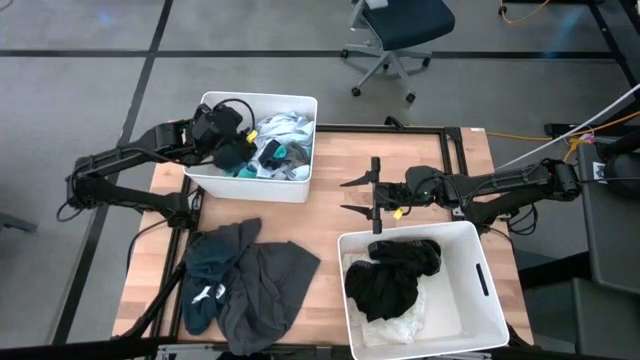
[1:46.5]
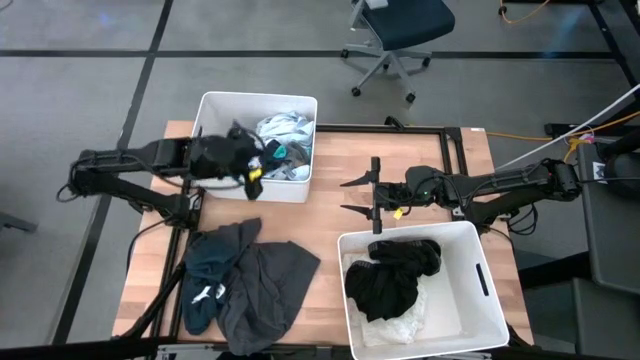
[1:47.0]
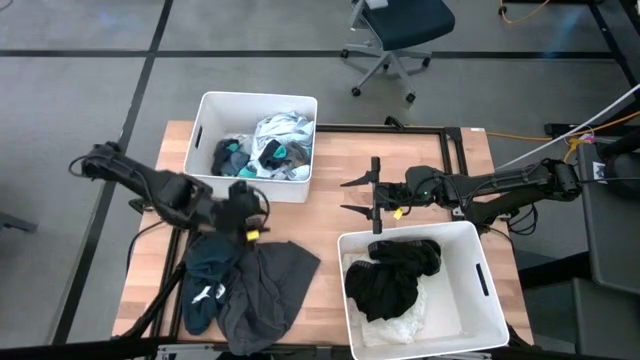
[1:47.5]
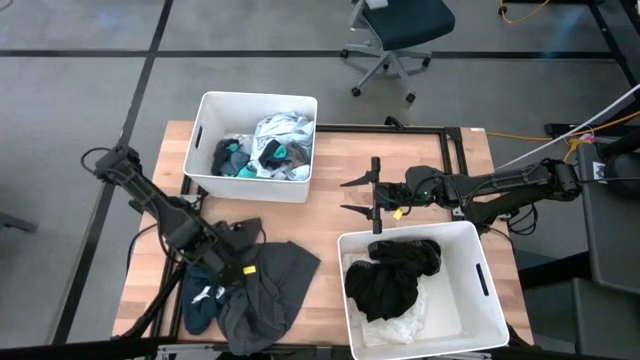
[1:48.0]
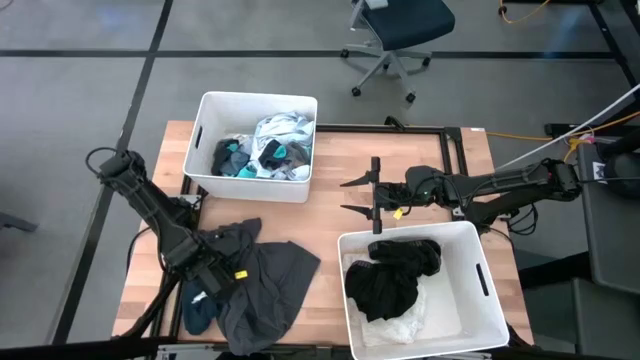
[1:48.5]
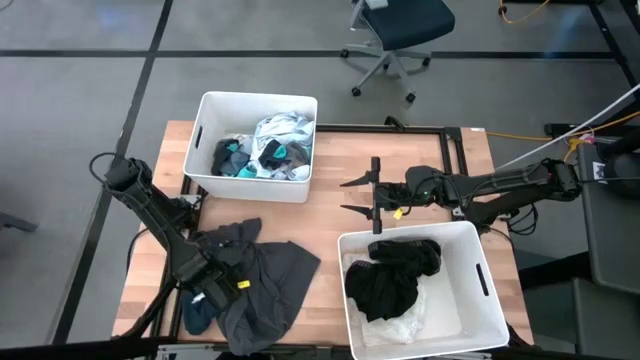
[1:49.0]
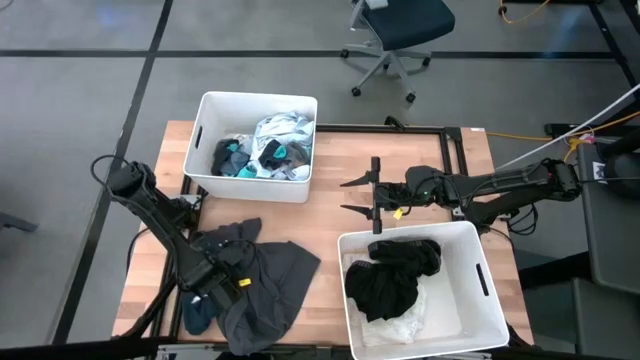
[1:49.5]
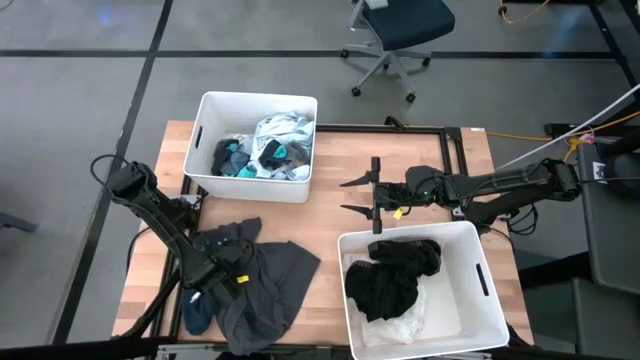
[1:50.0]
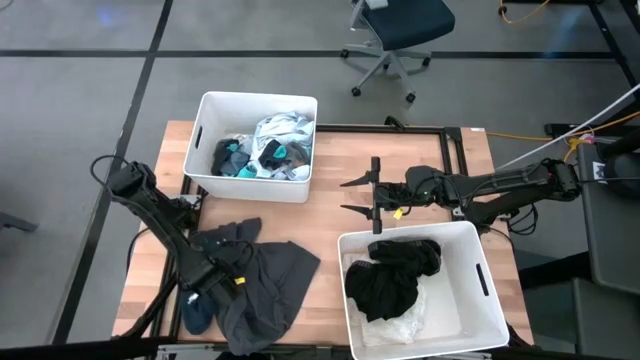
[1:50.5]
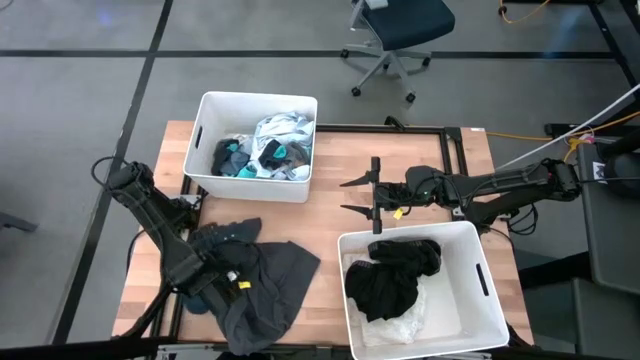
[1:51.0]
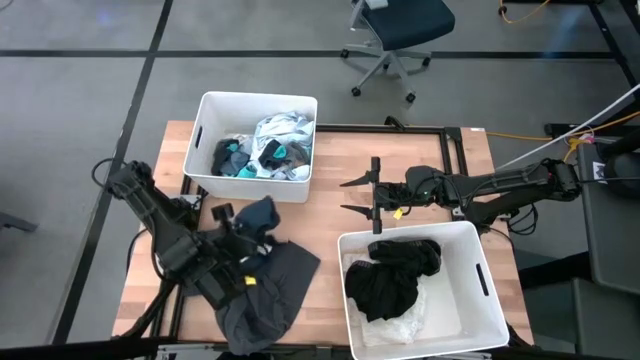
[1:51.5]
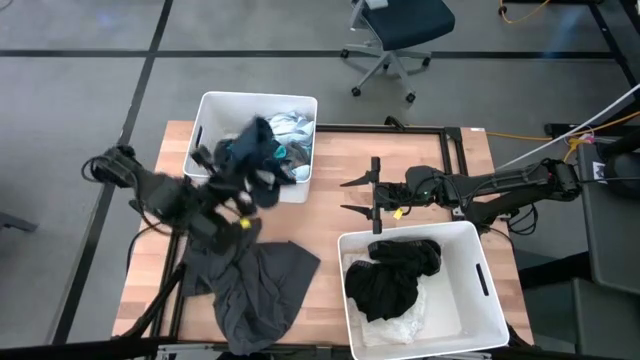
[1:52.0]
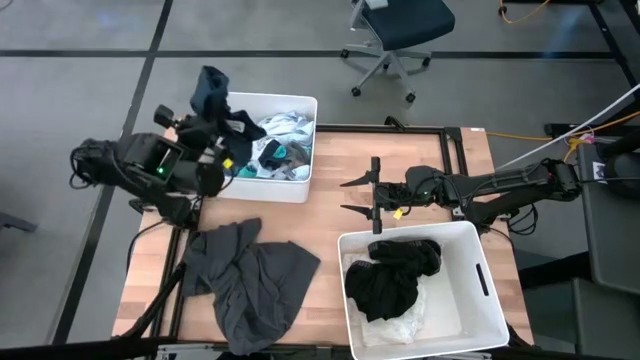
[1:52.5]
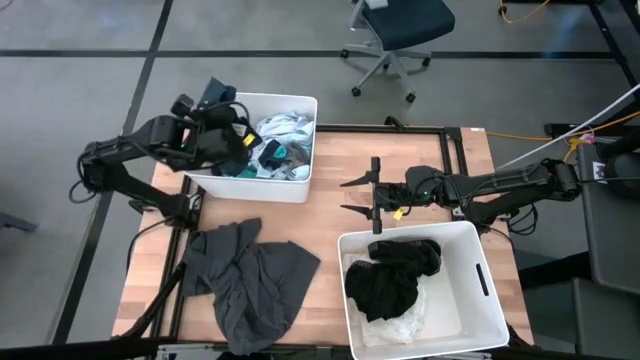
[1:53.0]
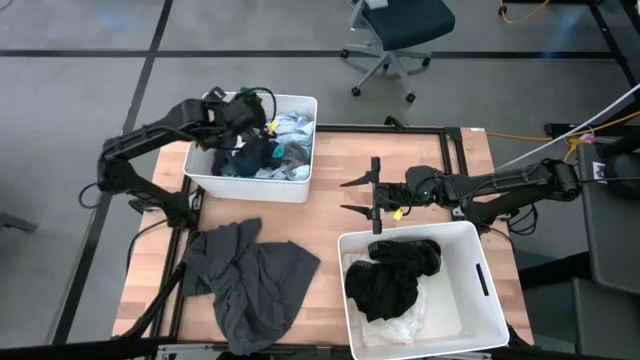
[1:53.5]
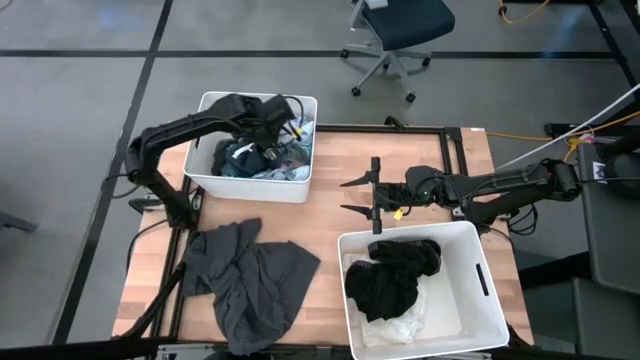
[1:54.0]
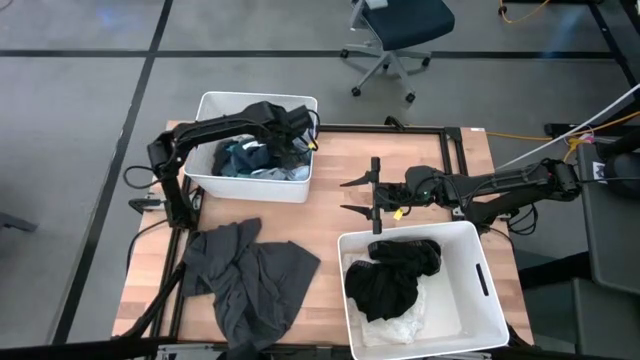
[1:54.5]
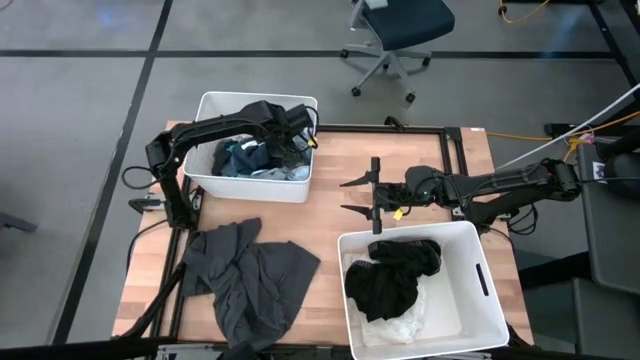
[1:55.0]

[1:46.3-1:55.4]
Task: Sort clothes
Put the black shorts into the top white laundry bin

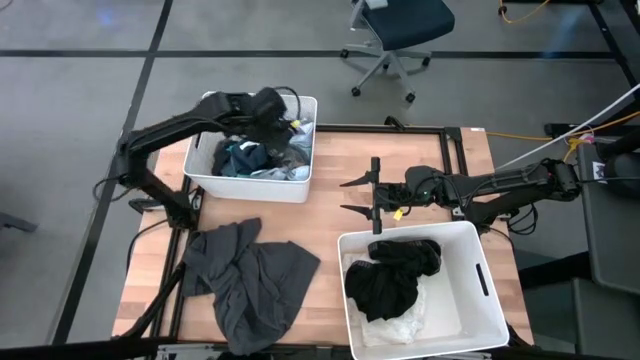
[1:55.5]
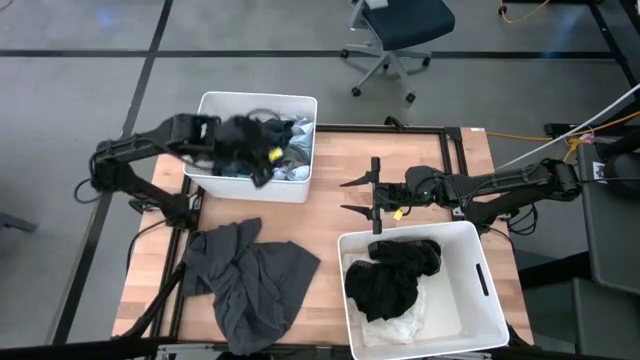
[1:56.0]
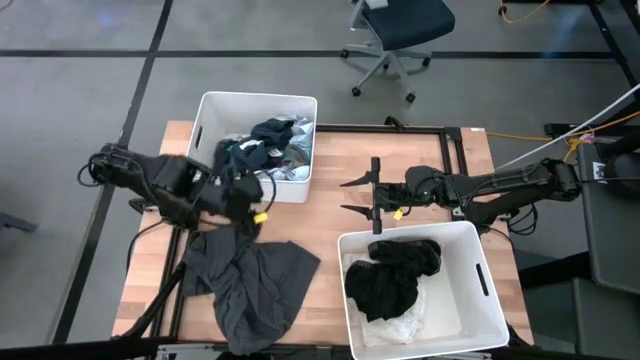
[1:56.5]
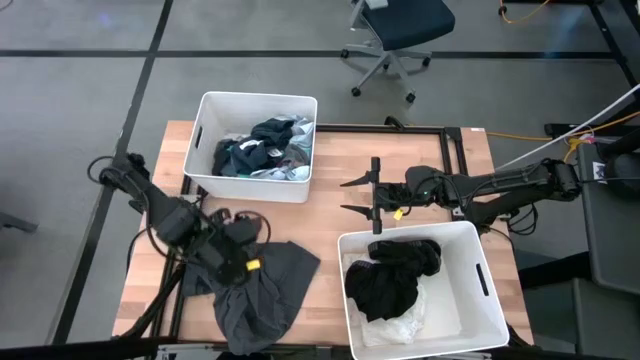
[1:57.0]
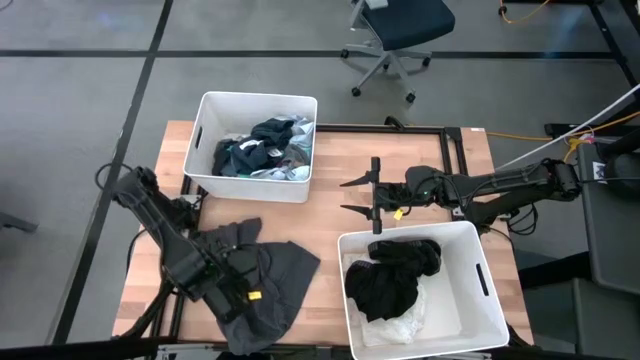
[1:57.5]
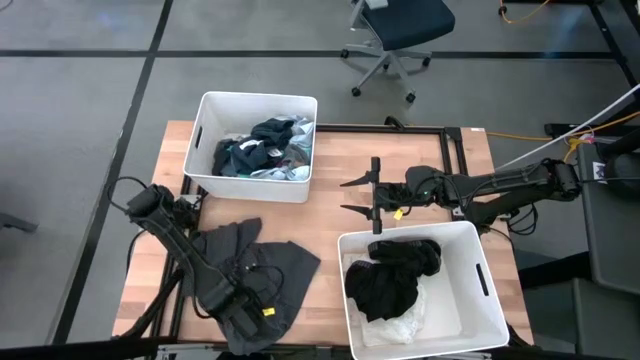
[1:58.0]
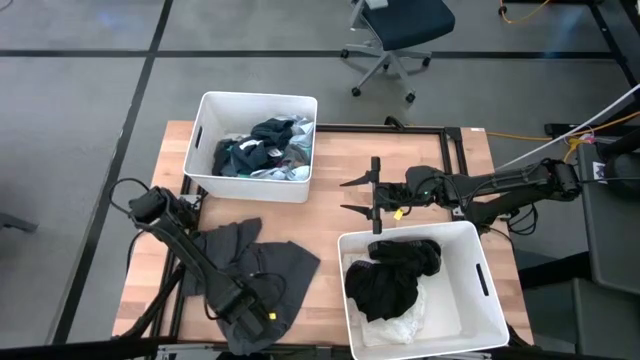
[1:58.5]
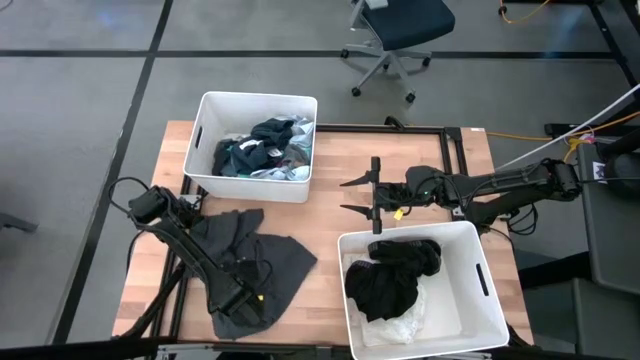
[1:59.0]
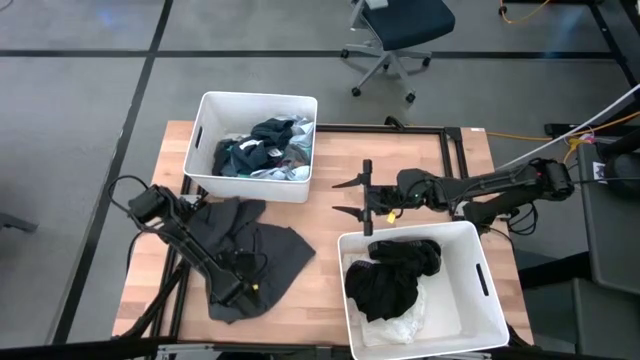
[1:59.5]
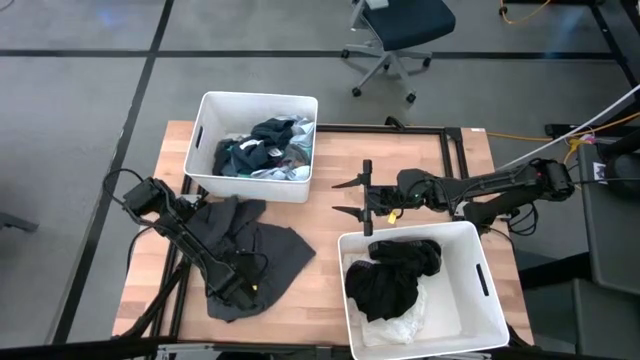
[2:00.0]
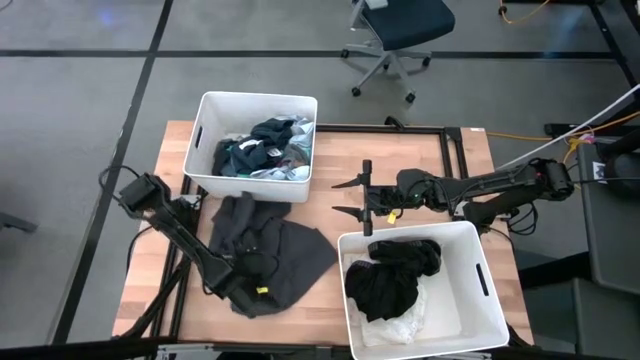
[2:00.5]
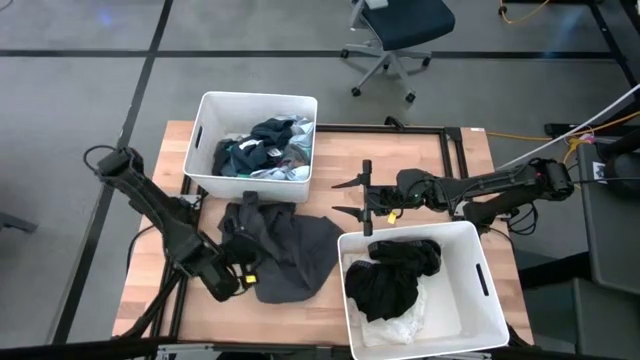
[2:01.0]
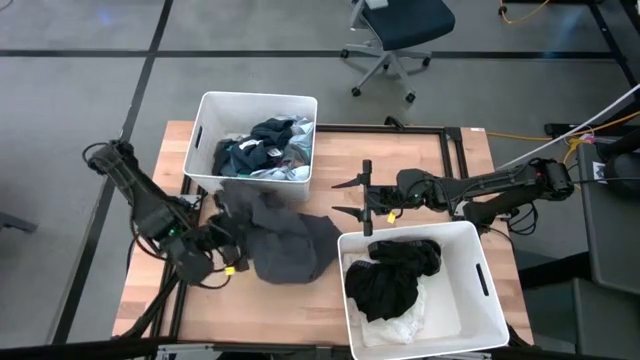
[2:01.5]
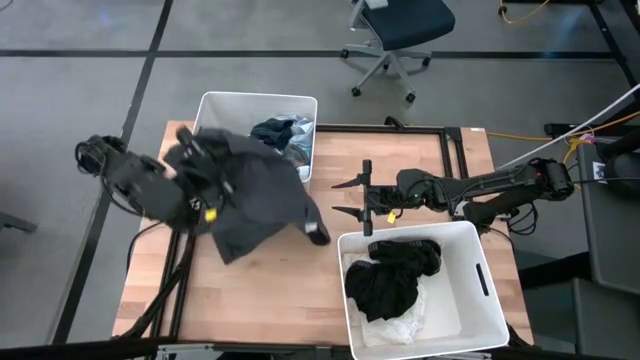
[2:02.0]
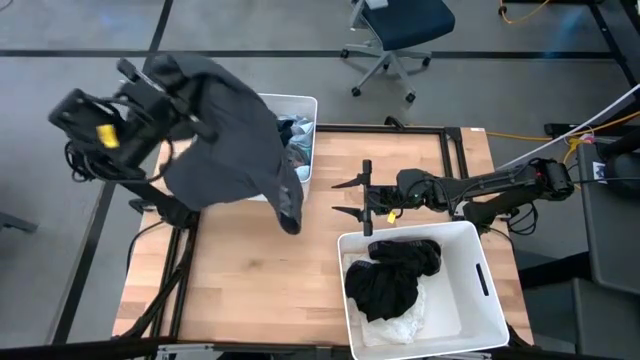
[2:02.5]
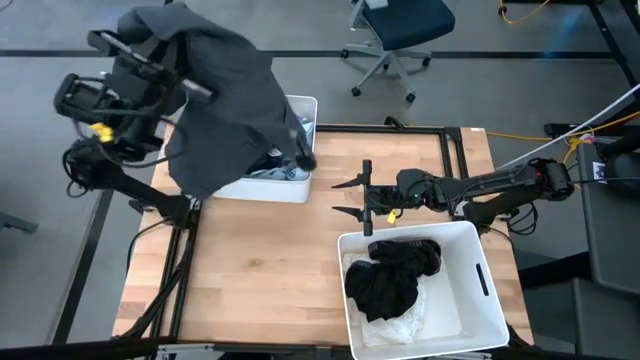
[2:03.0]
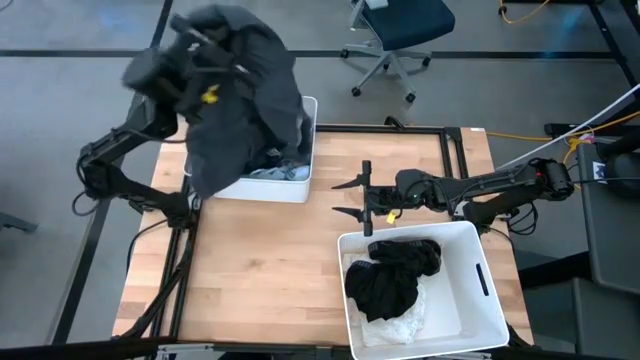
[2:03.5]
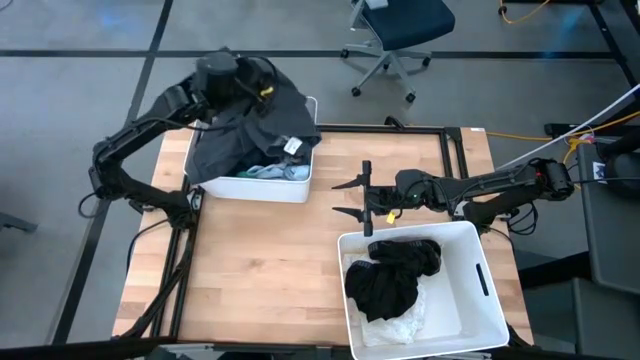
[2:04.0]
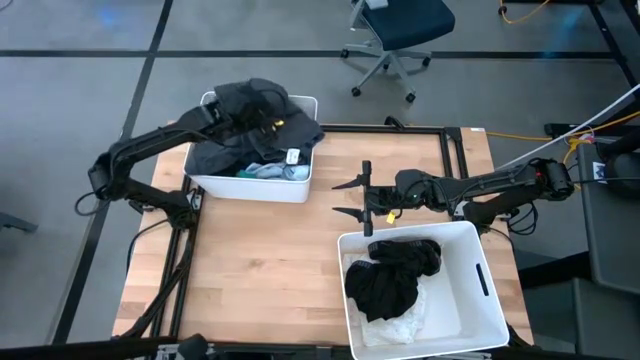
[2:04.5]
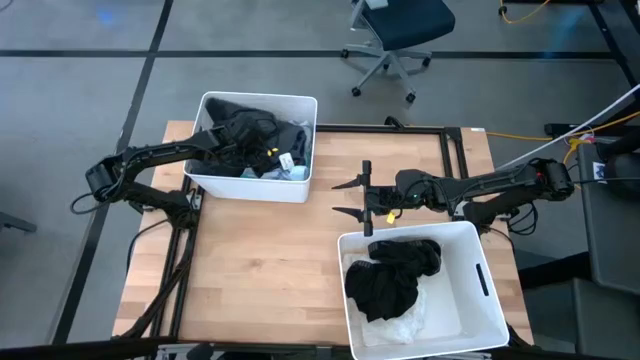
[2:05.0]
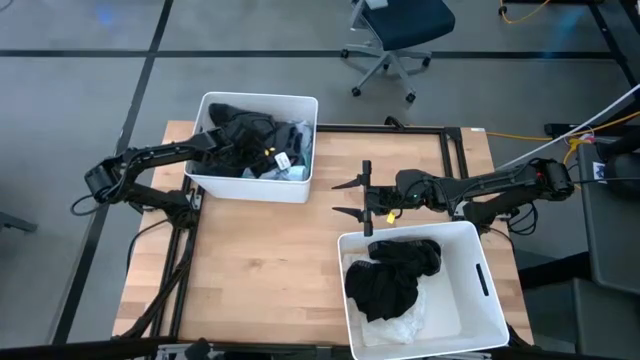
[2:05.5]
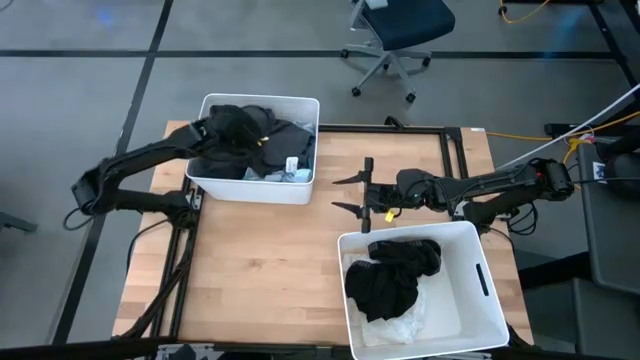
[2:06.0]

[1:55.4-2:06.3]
Put the black pants into the top white laundry bin
